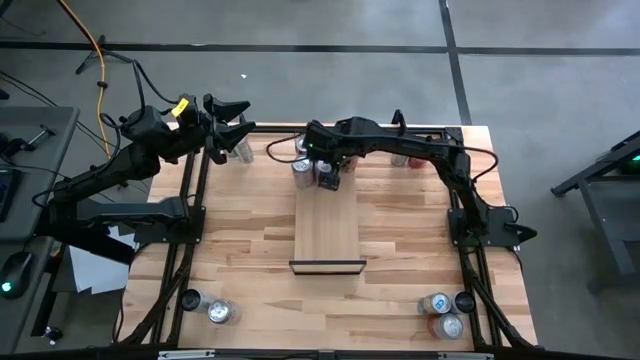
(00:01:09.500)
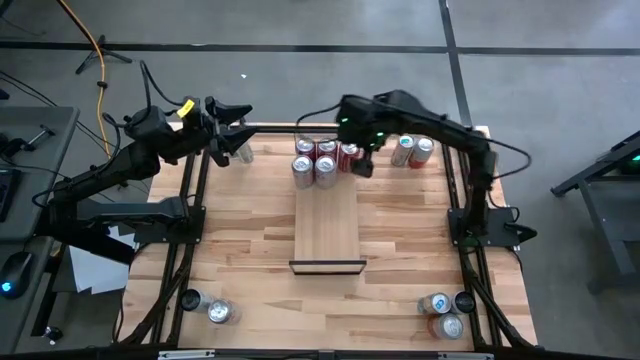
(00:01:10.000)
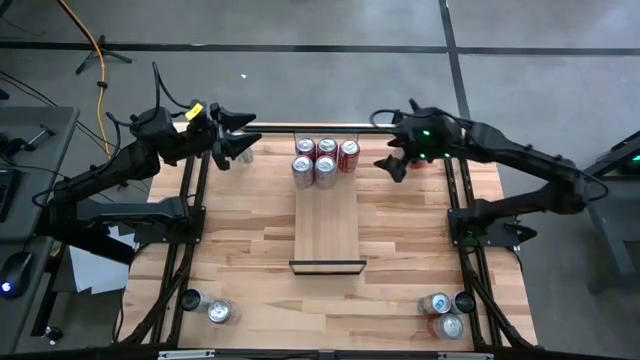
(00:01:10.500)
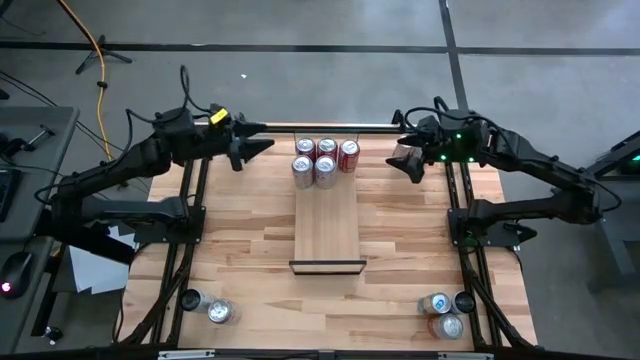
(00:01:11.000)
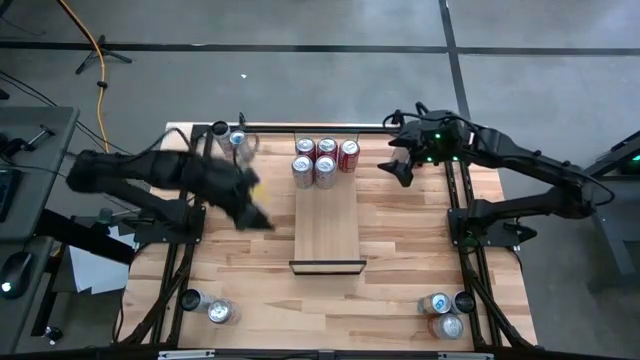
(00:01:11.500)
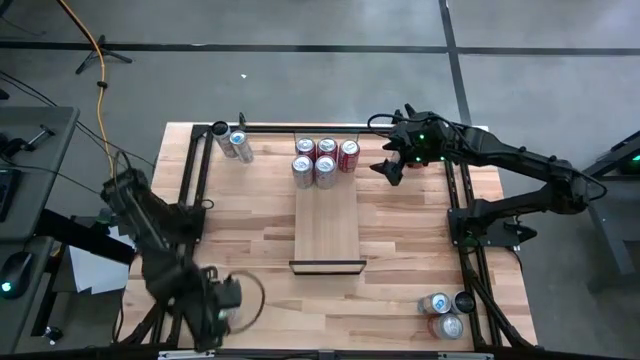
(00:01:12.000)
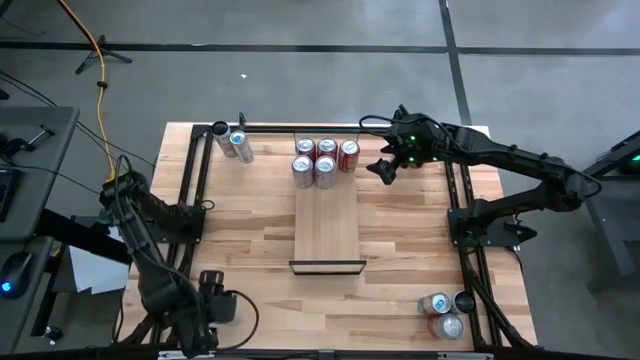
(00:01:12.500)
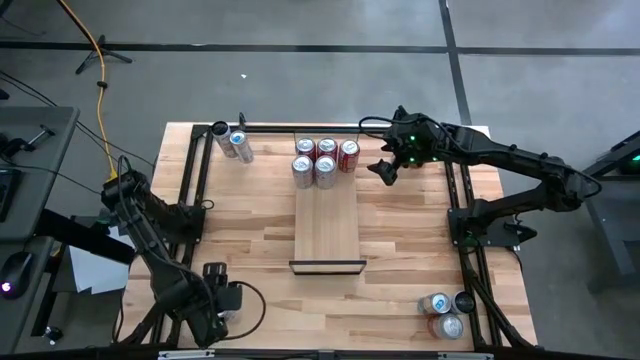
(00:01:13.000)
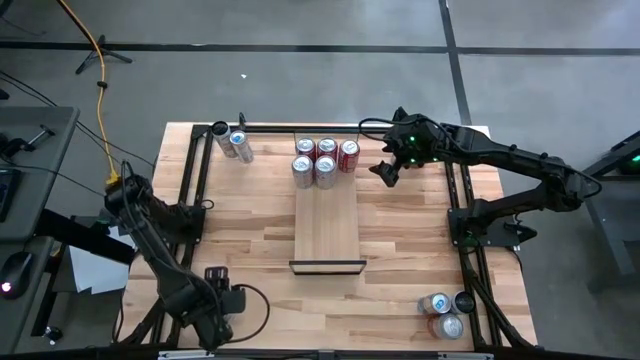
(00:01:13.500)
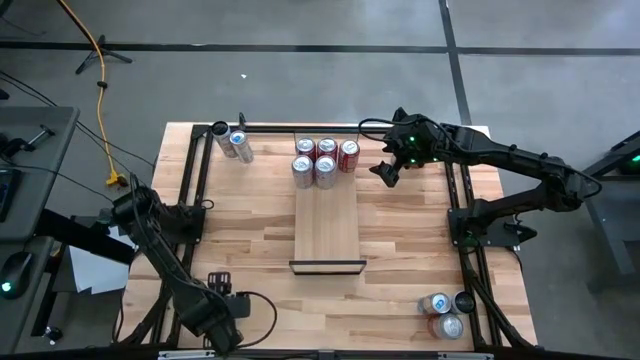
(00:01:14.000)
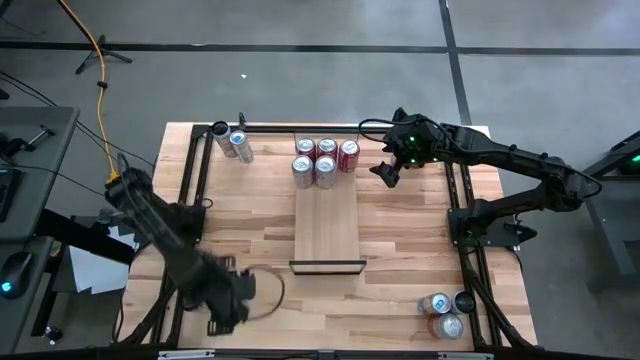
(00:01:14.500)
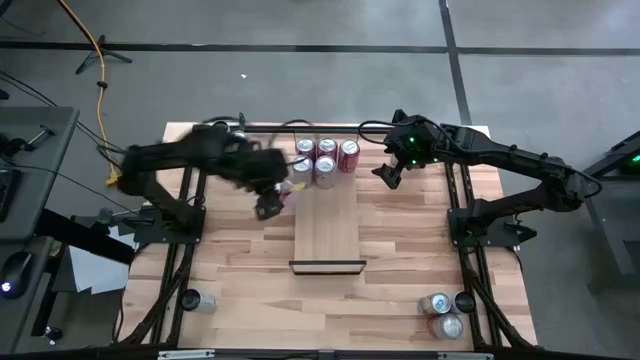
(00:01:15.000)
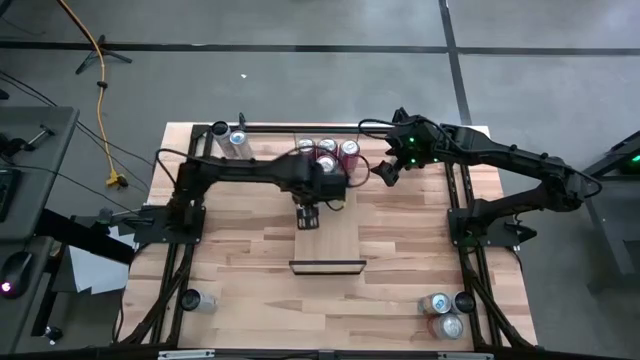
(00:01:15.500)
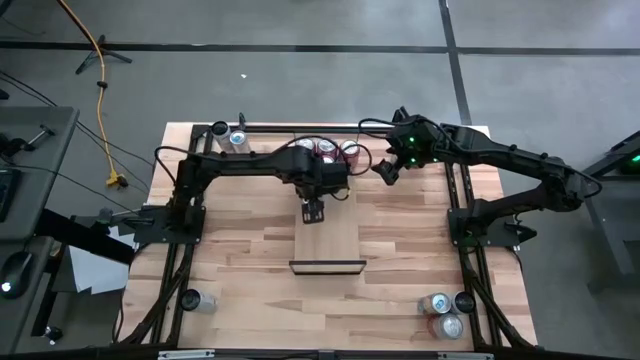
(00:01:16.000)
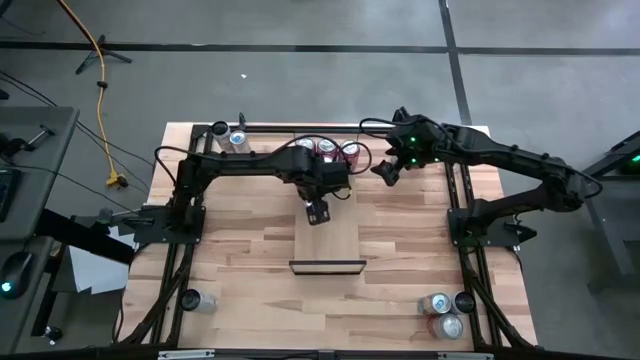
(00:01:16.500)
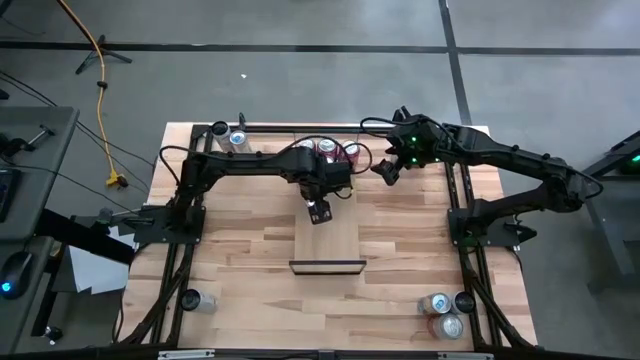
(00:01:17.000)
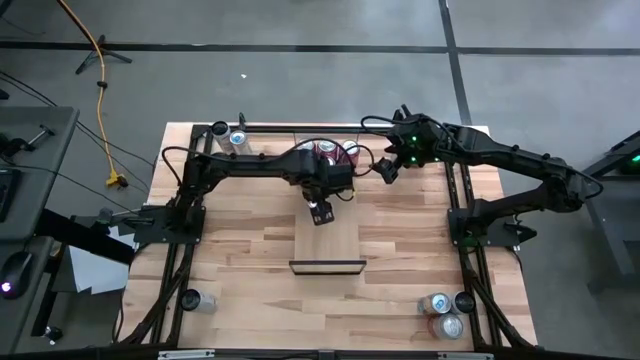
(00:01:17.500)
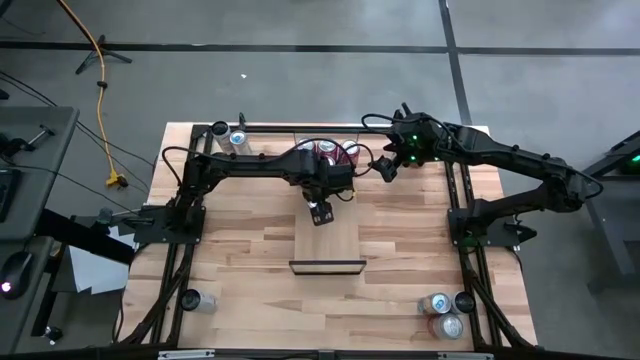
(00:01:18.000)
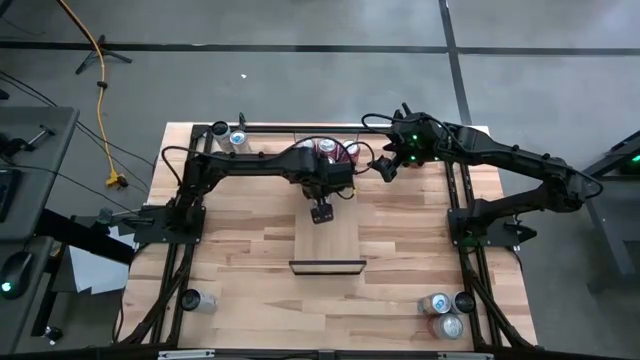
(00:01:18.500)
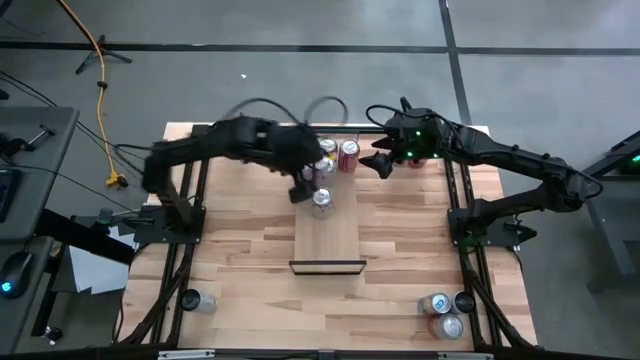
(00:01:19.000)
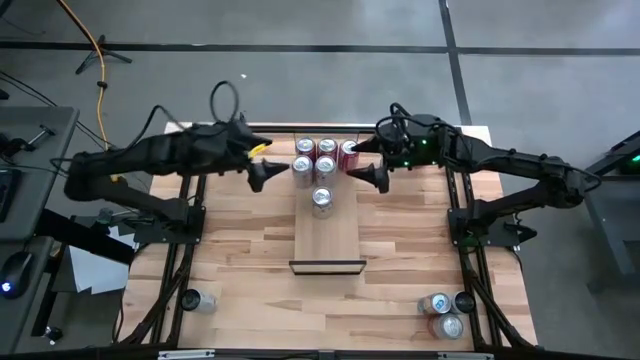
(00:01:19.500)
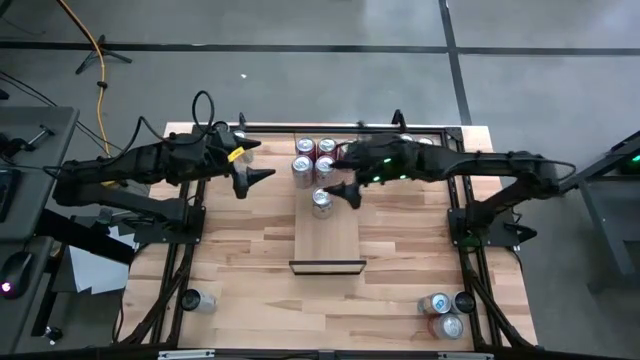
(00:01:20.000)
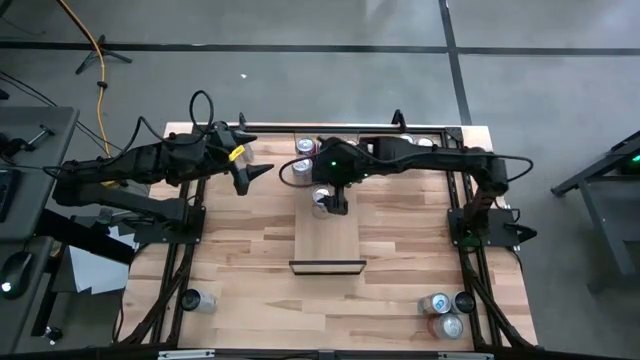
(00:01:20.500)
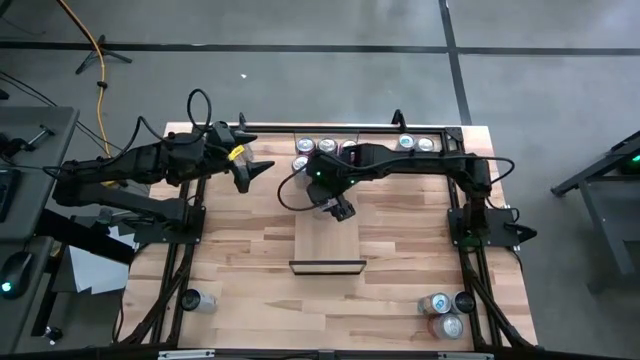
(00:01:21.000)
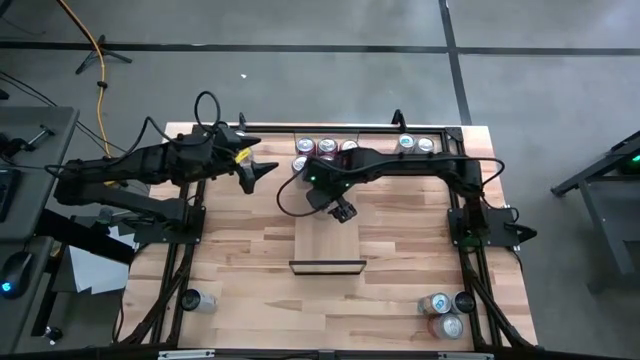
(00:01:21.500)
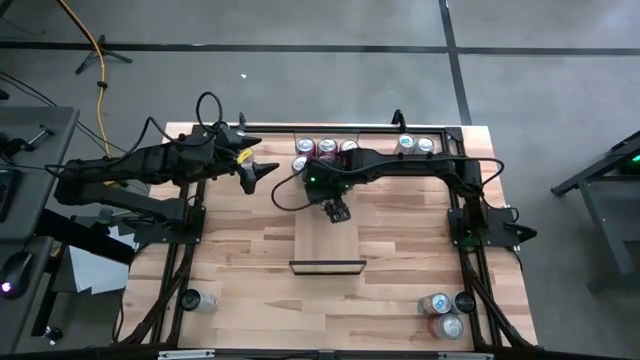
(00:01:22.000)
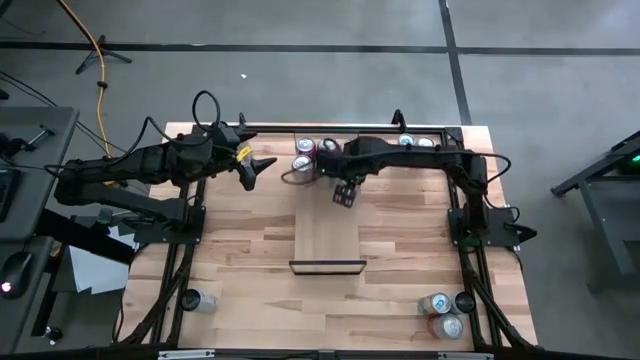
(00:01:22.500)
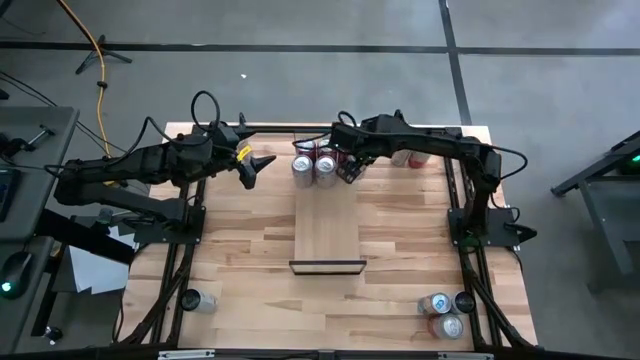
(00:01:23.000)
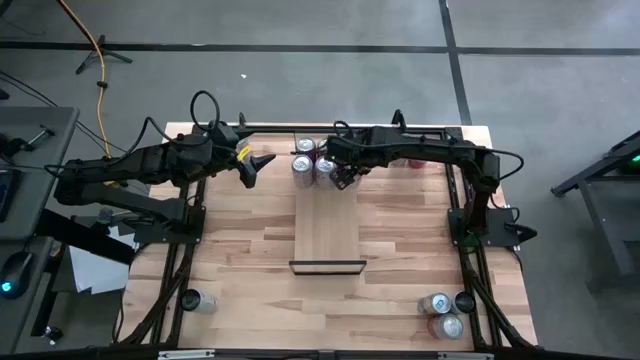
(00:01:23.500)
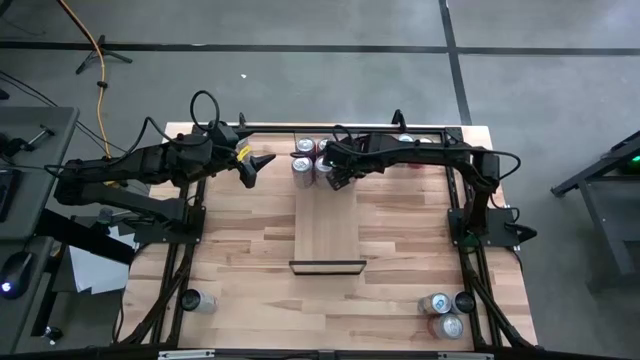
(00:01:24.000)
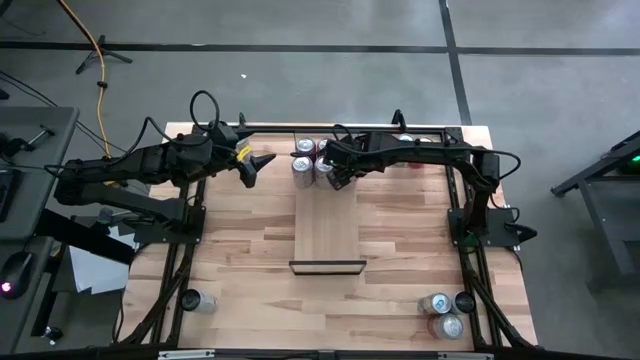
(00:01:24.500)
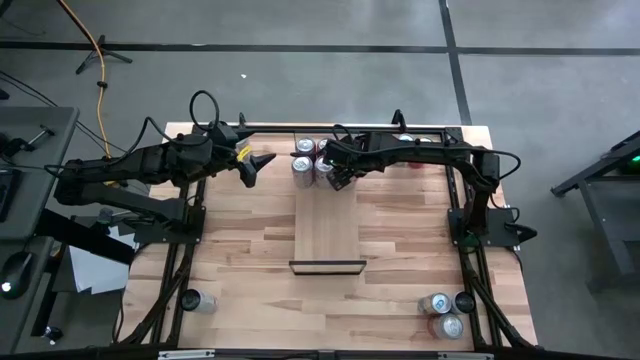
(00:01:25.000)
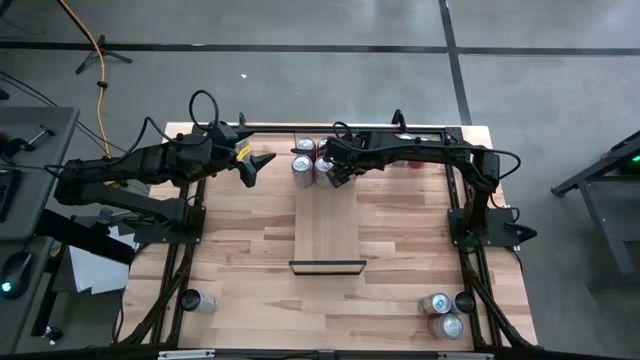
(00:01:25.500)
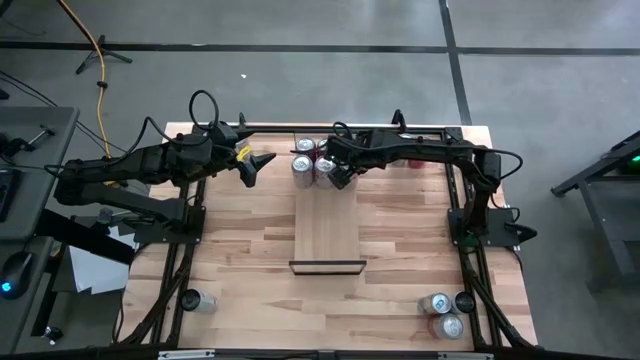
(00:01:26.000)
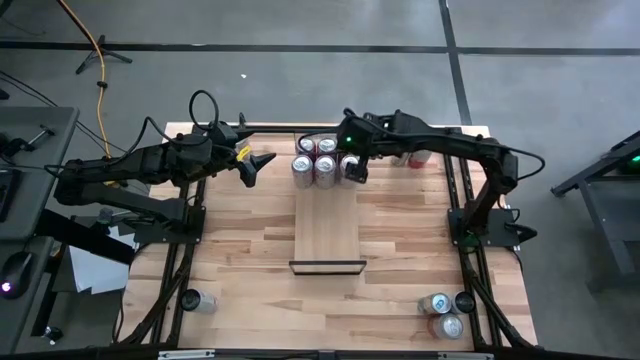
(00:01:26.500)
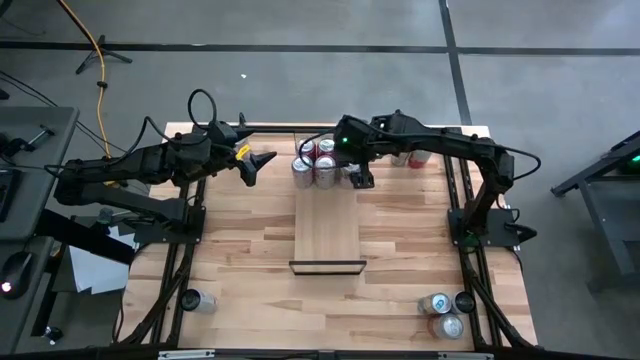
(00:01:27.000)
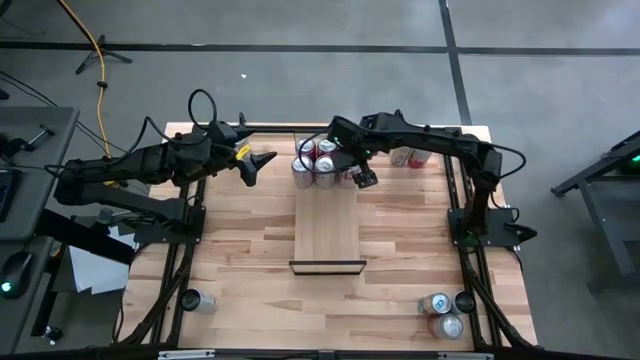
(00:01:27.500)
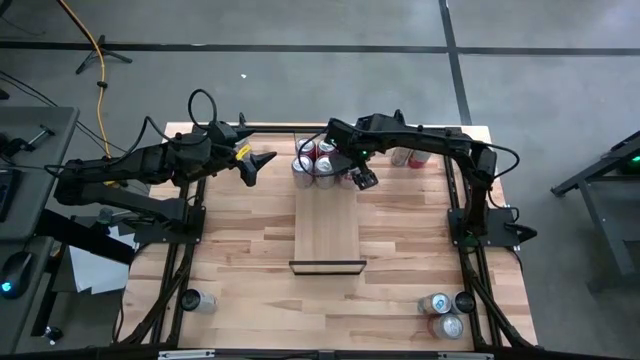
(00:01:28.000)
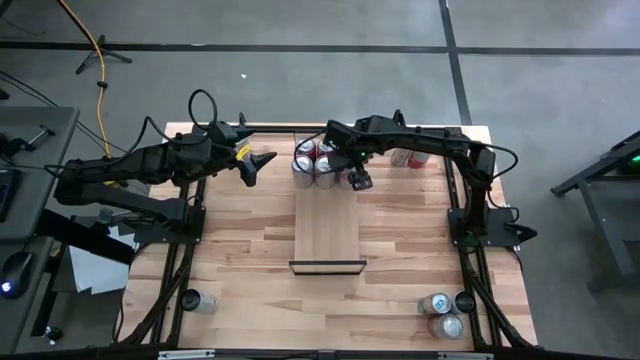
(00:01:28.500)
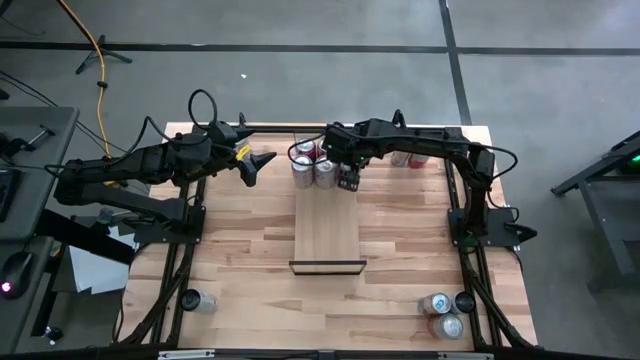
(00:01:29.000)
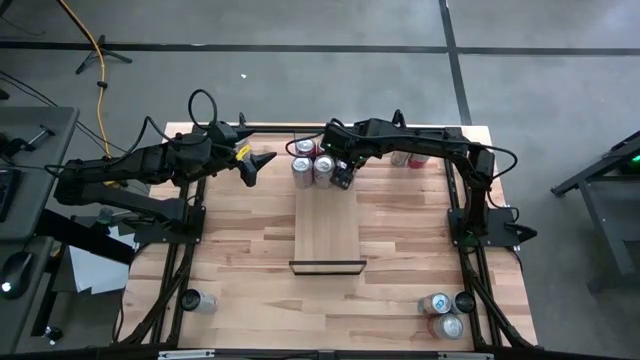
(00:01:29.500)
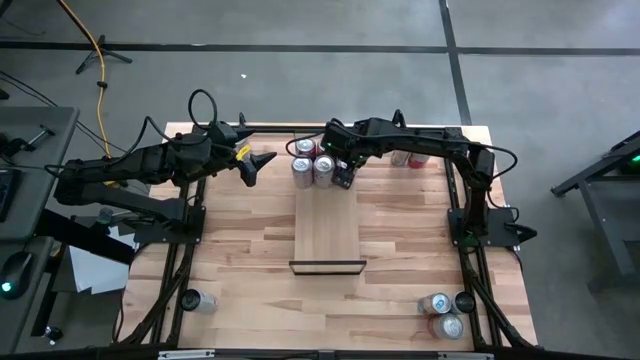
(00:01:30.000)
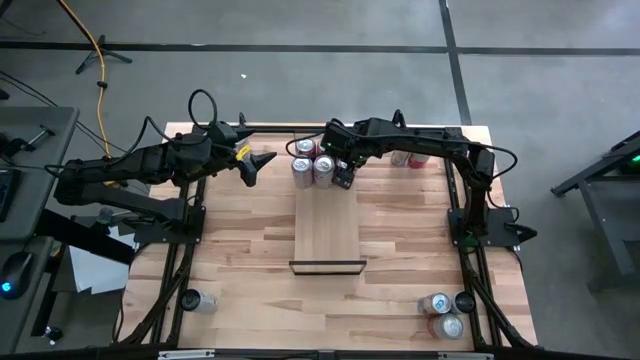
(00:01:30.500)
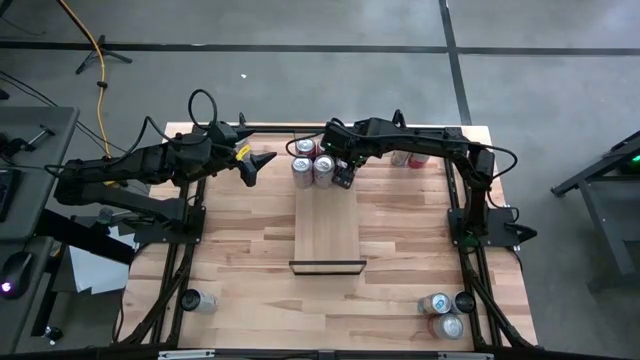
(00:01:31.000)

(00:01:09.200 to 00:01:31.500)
Task: Place canned beverage on shelf
Put the red silver soda can on the shelf aligned with the other red silver soda cans
